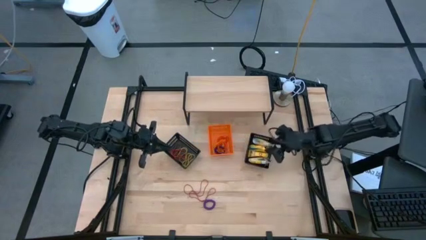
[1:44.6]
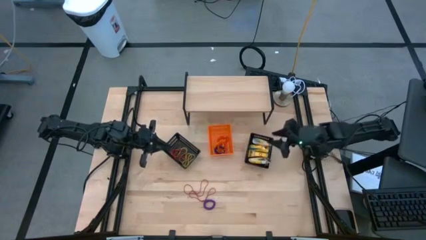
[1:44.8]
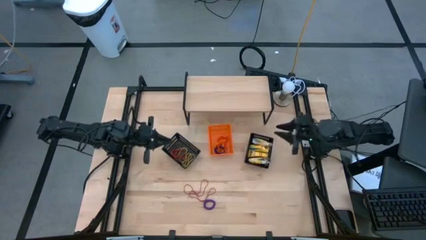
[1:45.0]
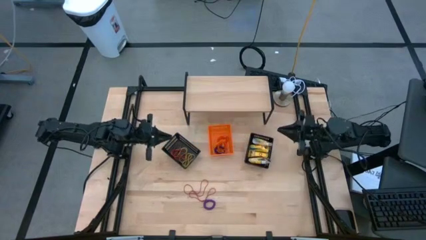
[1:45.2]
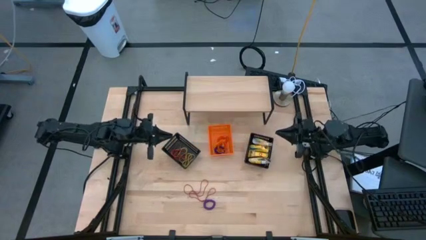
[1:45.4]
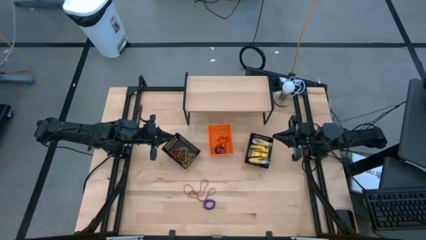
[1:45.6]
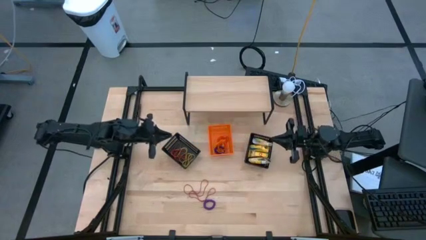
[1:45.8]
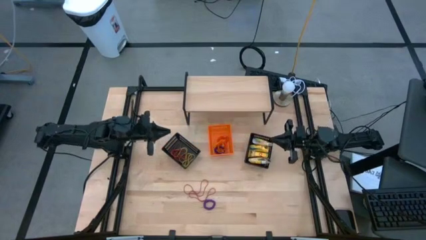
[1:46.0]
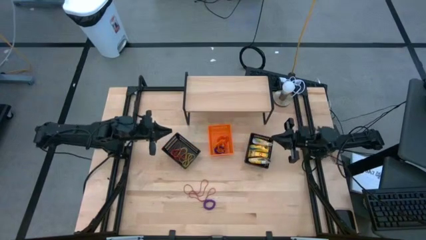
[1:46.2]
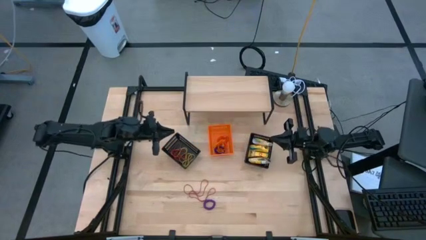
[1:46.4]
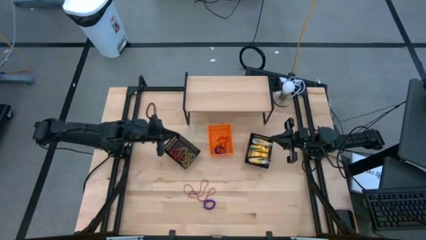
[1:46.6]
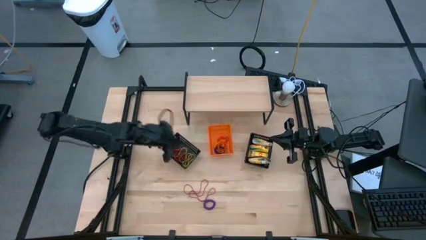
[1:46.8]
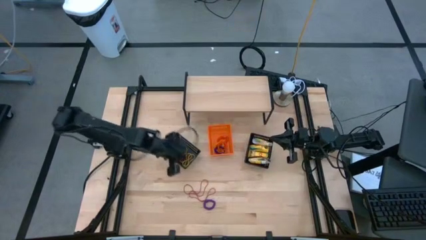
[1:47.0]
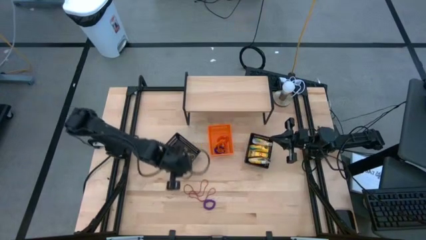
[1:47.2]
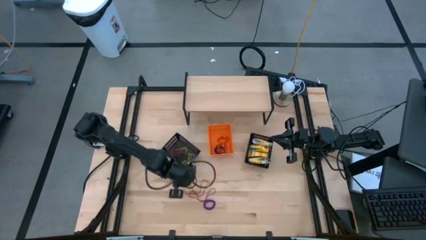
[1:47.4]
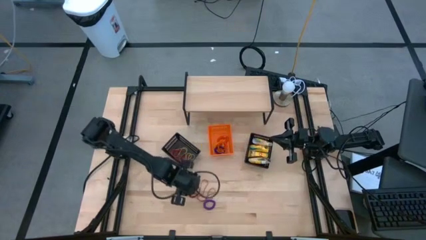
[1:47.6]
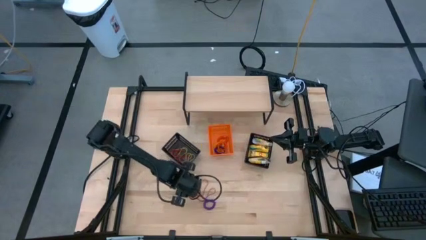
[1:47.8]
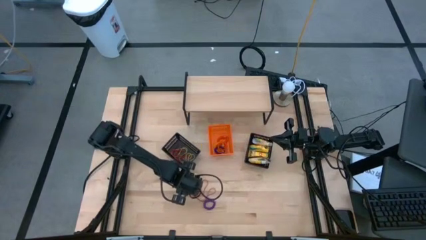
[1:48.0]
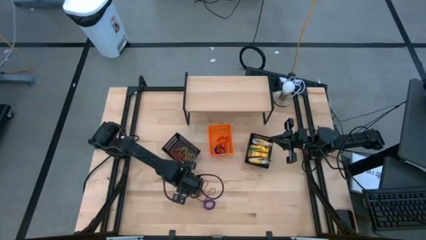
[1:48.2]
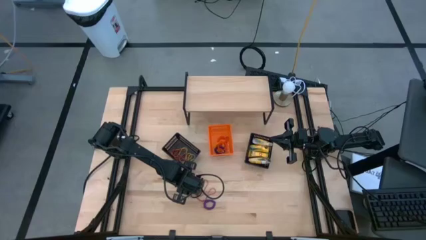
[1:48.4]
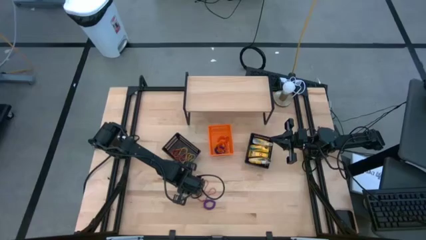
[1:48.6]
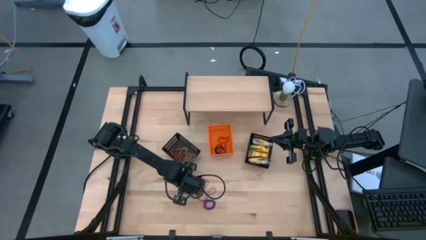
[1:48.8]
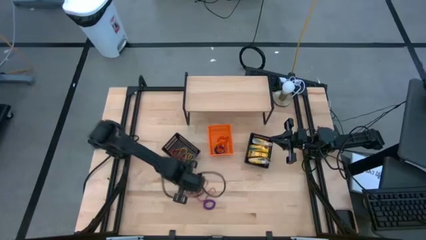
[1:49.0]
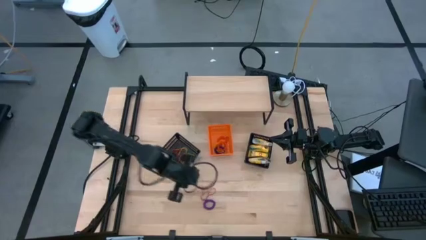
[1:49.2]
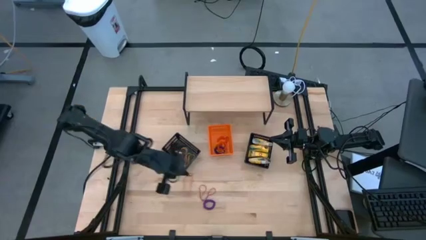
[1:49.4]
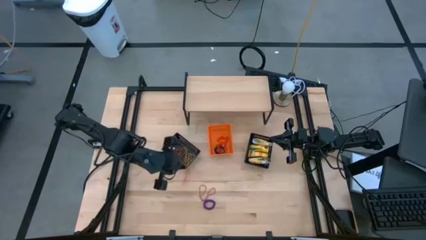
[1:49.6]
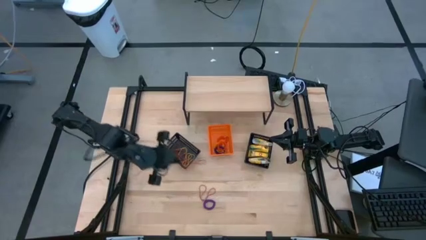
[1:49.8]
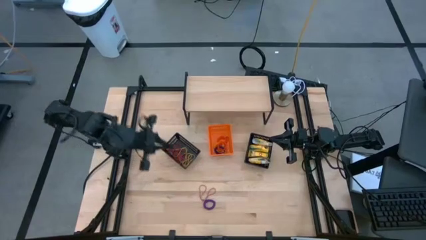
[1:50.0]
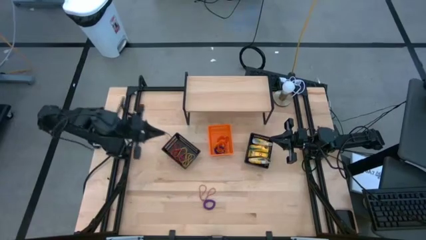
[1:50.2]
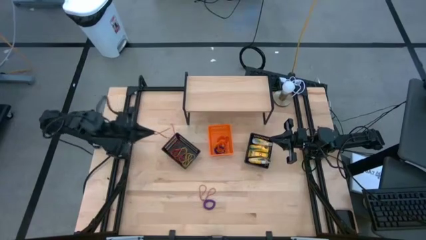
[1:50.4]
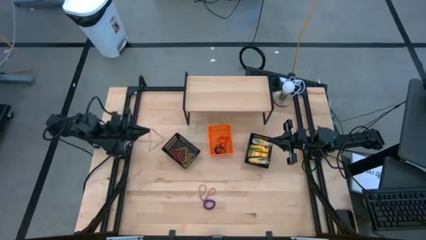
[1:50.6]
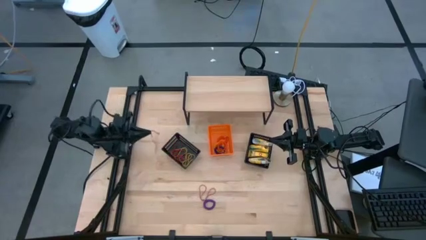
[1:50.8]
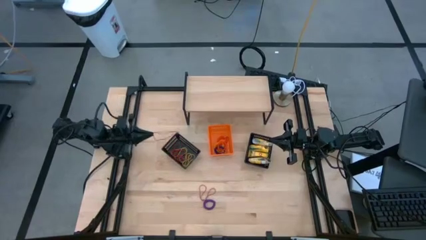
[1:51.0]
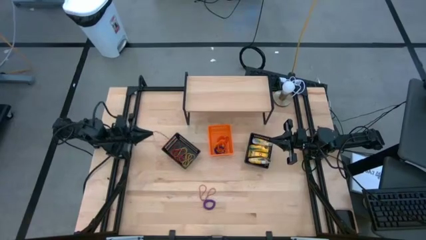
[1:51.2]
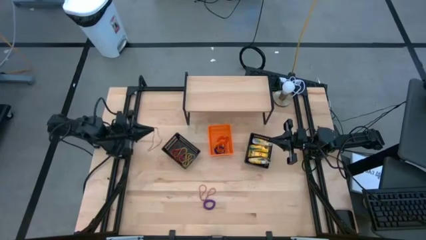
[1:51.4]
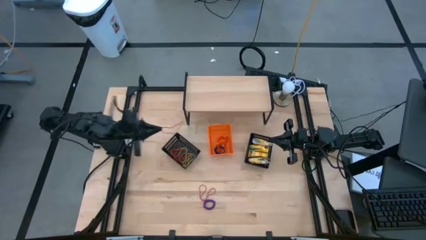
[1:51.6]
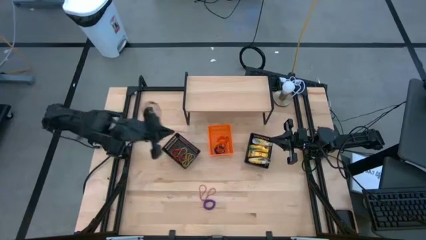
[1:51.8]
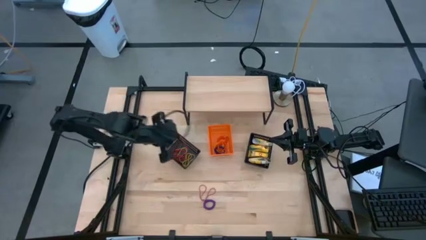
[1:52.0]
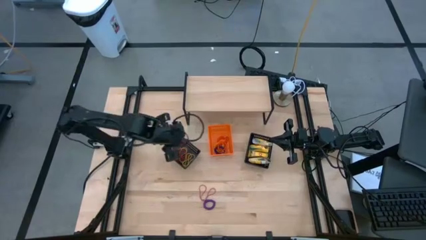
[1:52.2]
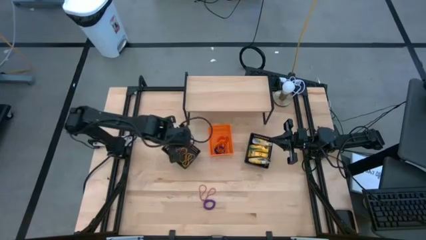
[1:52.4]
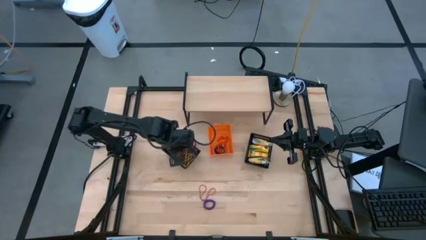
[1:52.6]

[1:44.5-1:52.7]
Task: Pick & Place Office Desk Supplies
Put the red rubber band into the left black bin

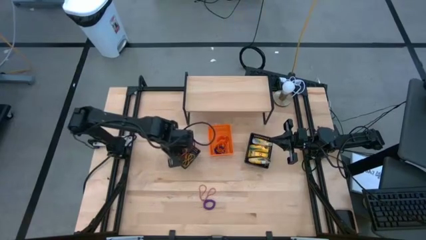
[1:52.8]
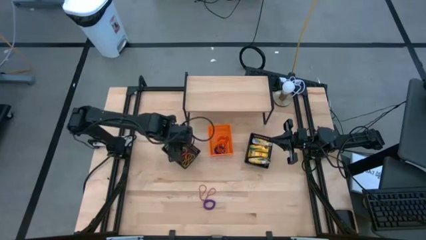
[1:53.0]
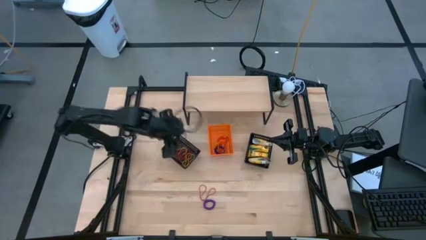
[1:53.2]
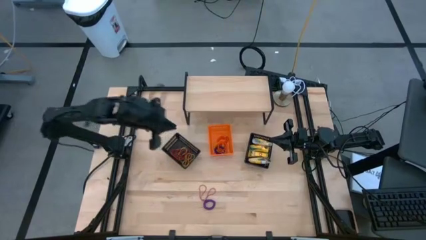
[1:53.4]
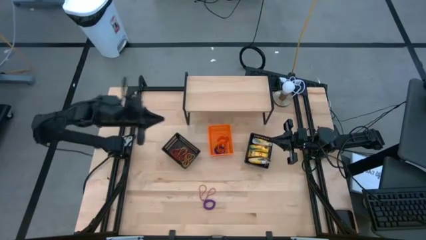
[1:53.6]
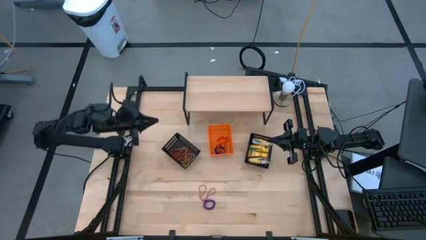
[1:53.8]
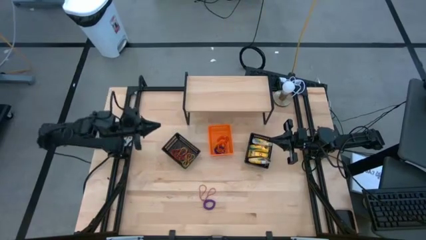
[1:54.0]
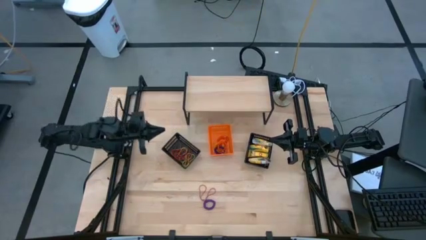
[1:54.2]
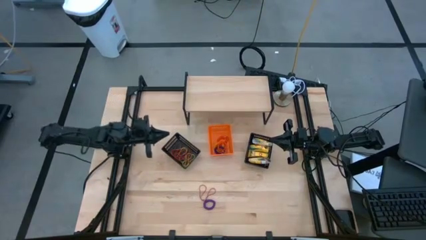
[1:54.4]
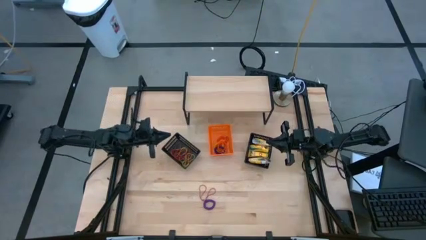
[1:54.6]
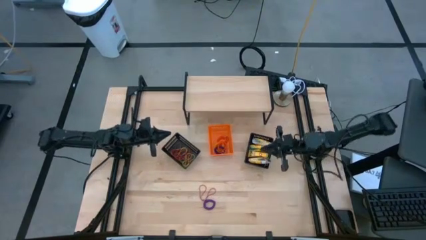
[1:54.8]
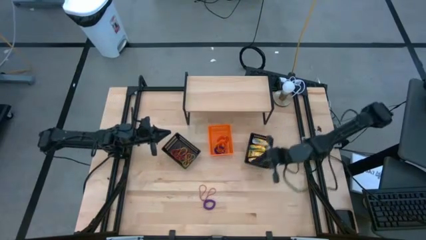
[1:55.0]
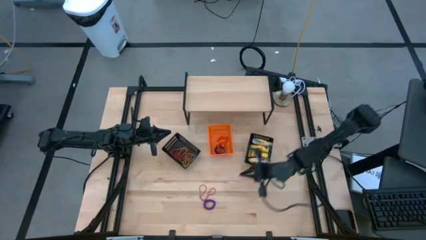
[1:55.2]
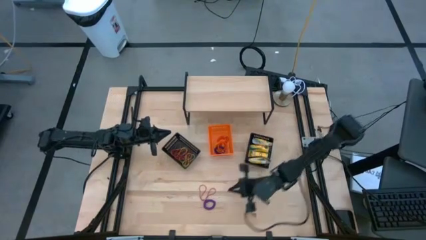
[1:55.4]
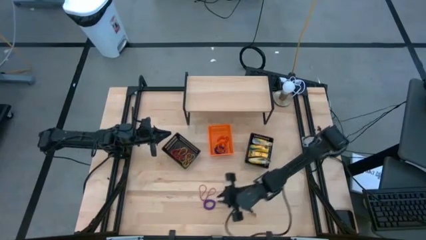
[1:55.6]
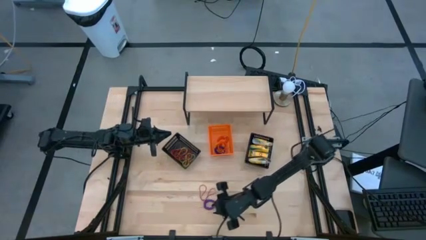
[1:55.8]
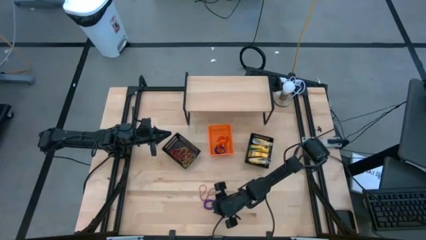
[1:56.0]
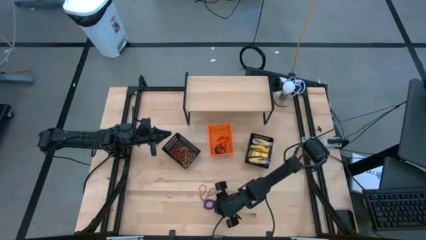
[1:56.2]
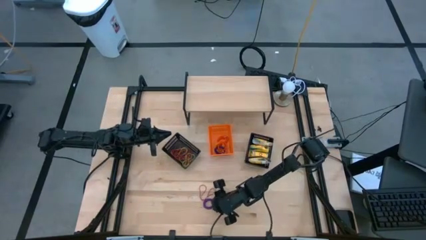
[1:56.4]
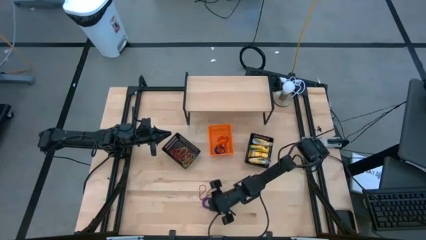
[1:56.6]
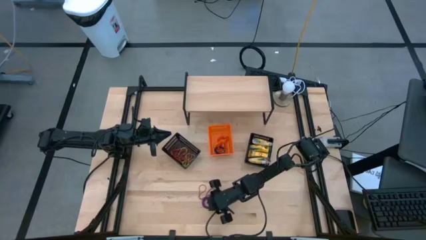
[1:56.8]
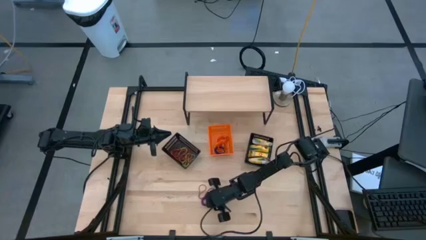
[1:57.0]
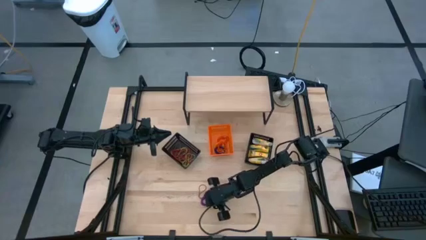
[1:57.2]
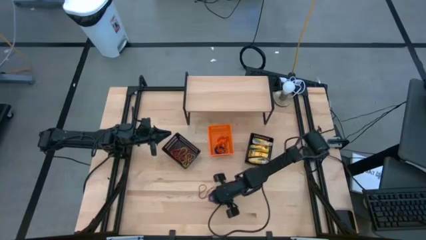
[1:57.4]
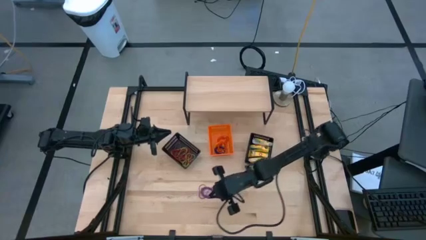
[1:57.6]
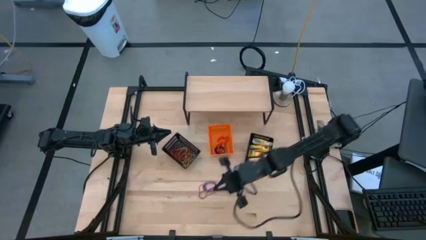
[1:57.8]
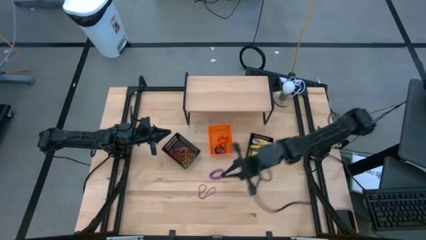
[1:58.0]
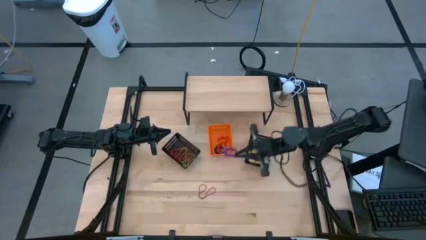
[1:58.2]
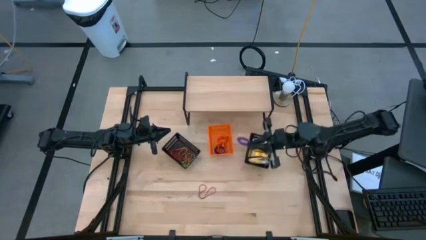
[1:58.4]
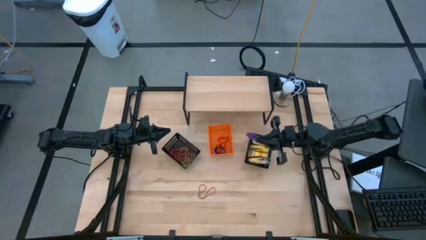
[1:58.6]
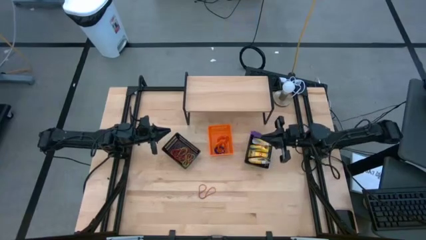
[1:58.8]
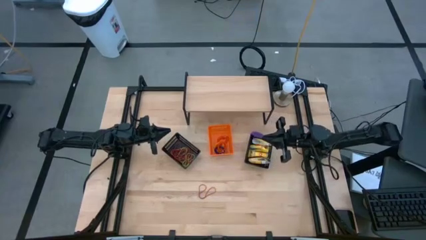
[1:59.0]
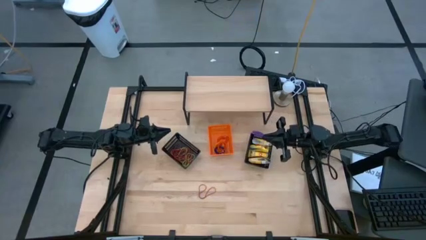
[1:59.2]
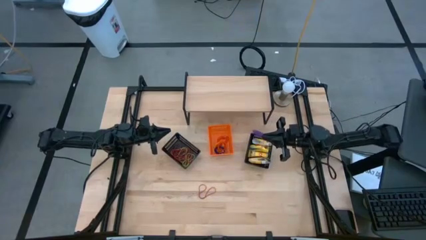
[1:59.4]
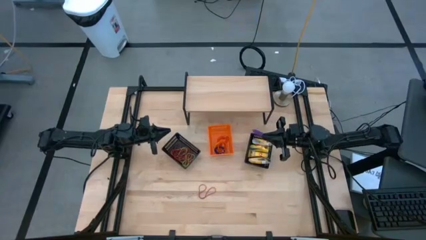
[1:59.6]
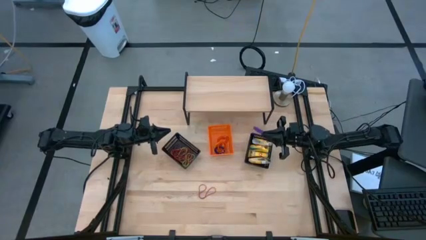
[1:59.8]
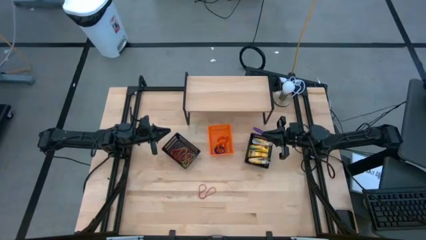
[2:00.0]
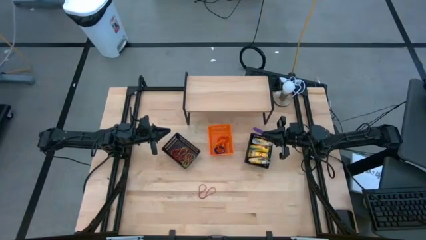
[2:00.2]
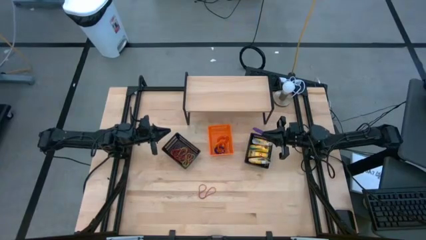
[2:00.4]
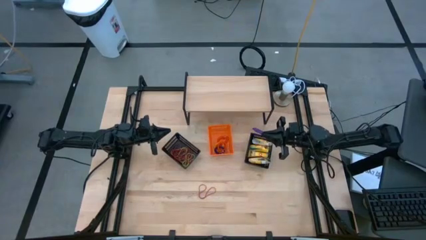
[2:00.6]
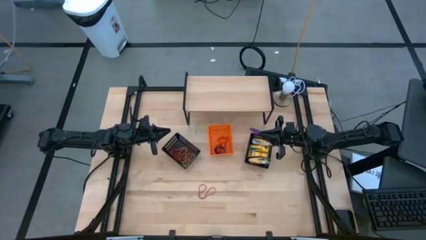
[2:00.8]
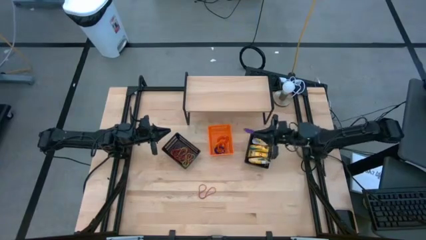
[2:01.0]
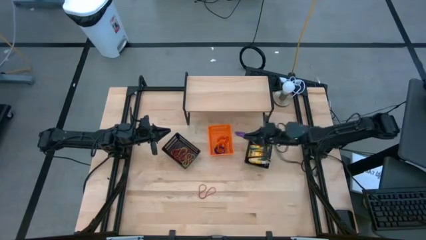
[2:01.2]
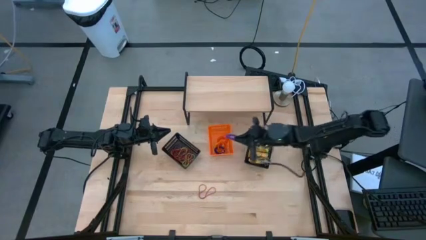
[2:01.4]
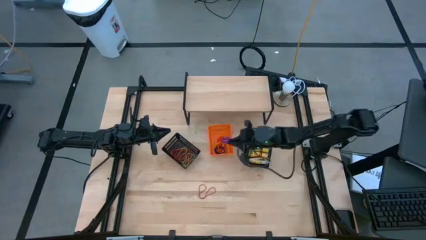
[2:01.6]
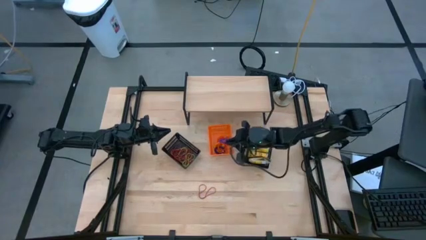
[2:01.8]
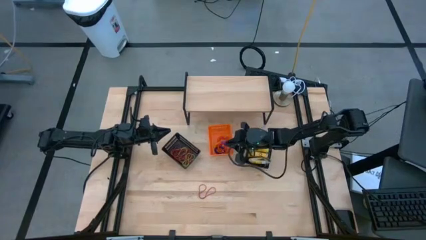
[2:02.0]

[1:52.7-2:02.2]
Put the violet spring keychain into the orange bin
